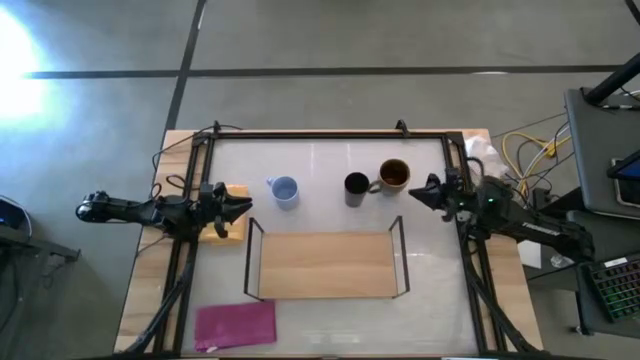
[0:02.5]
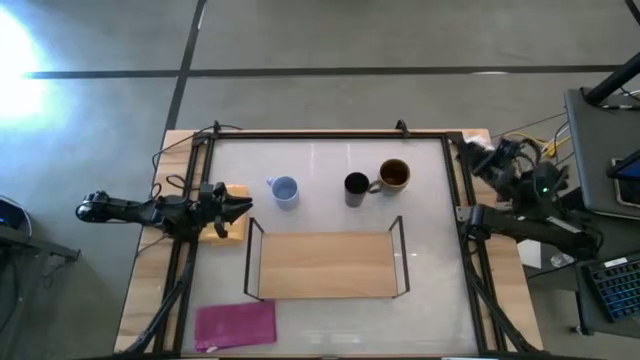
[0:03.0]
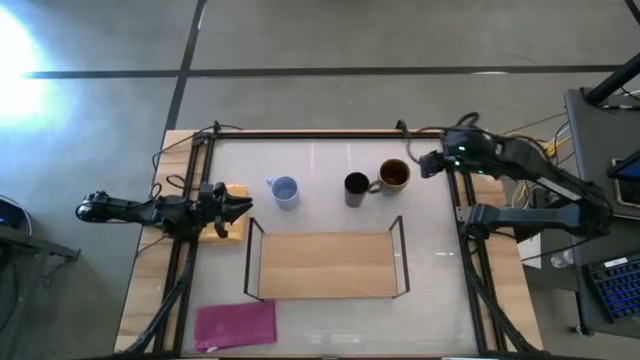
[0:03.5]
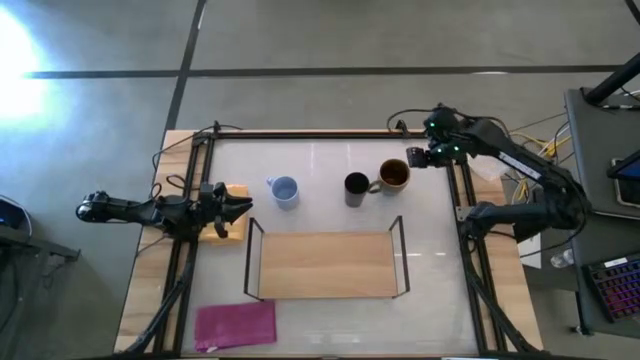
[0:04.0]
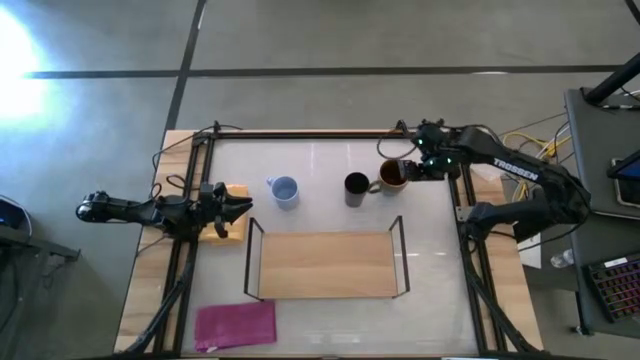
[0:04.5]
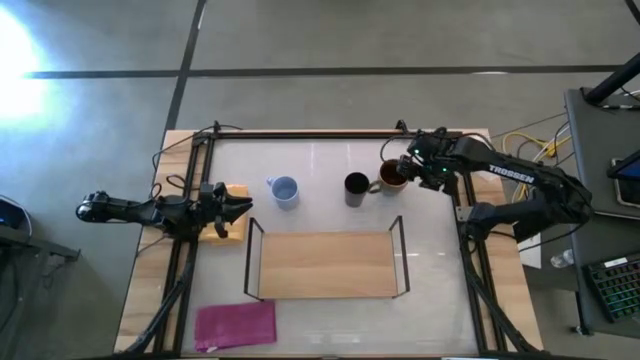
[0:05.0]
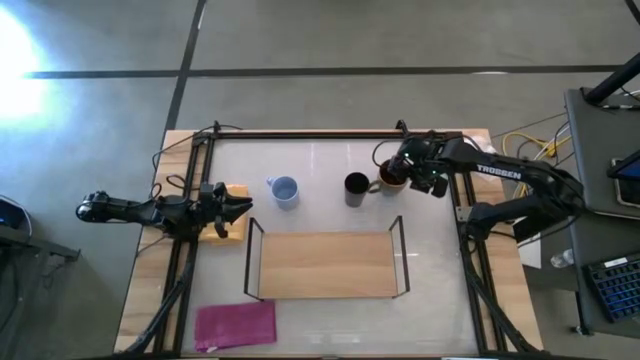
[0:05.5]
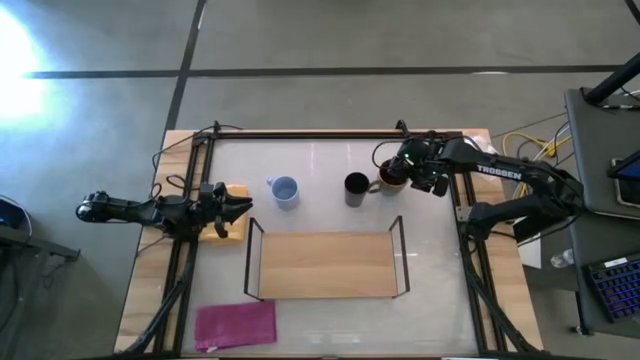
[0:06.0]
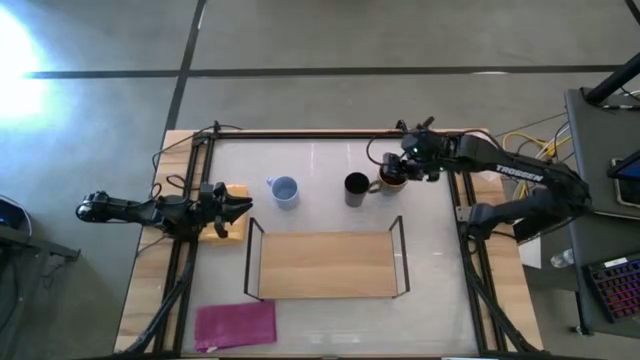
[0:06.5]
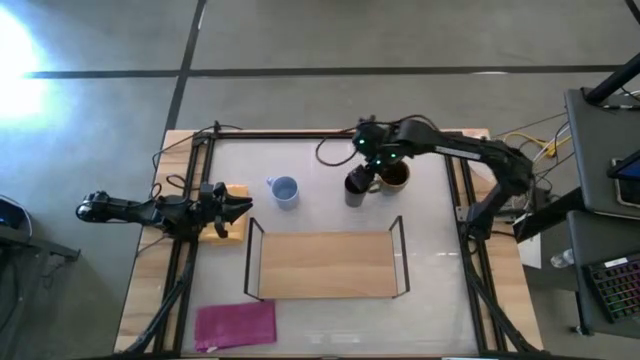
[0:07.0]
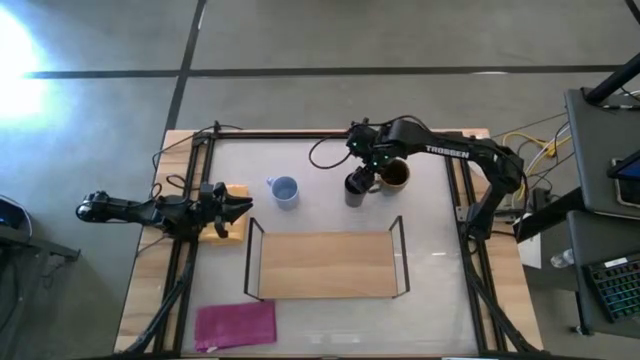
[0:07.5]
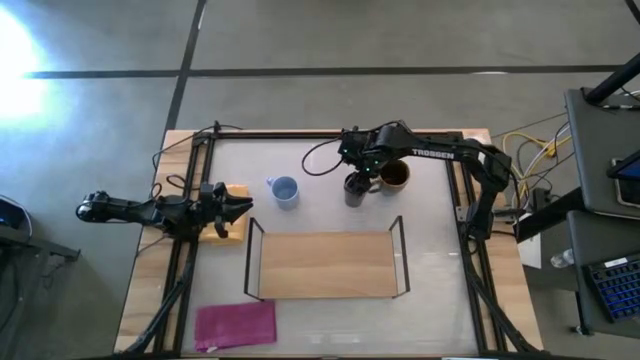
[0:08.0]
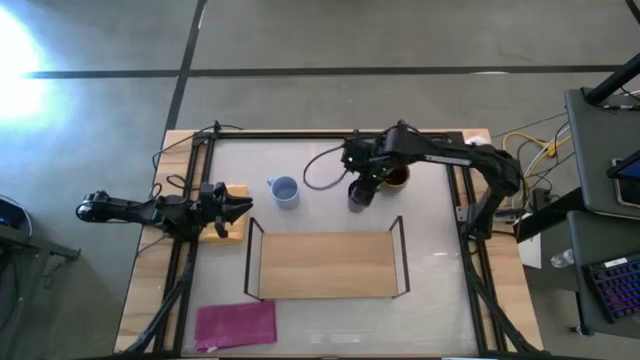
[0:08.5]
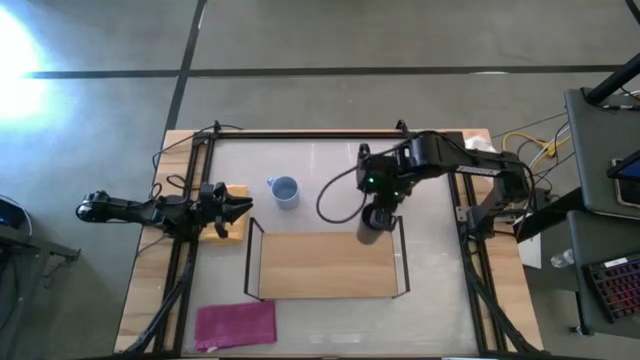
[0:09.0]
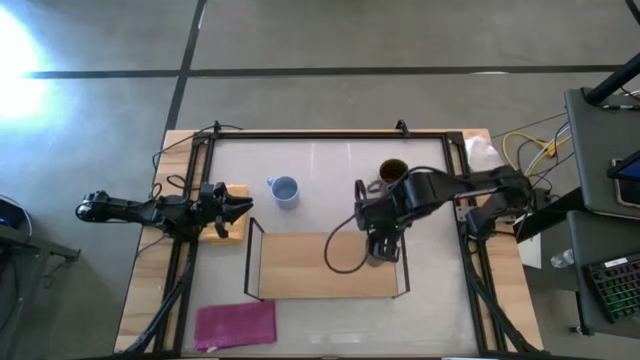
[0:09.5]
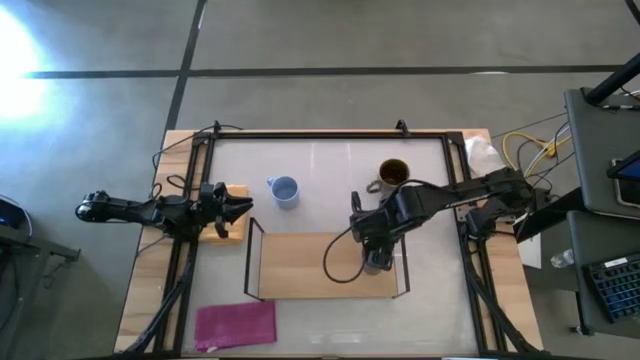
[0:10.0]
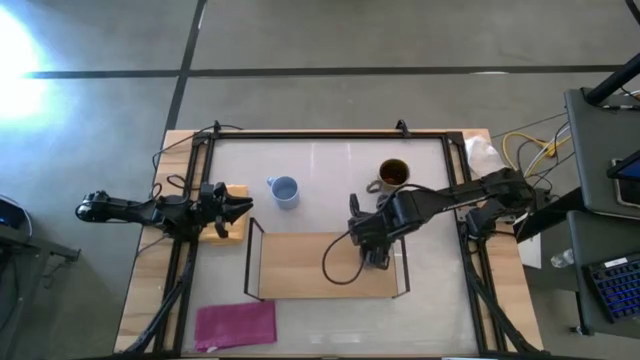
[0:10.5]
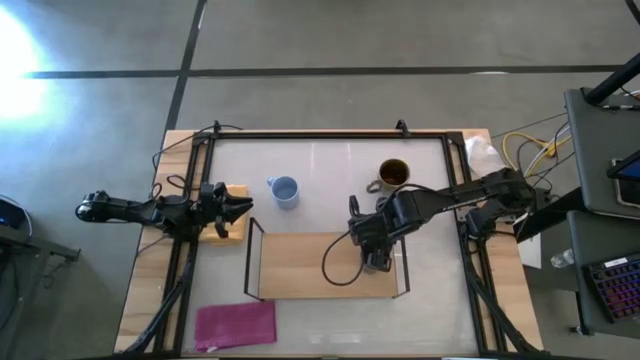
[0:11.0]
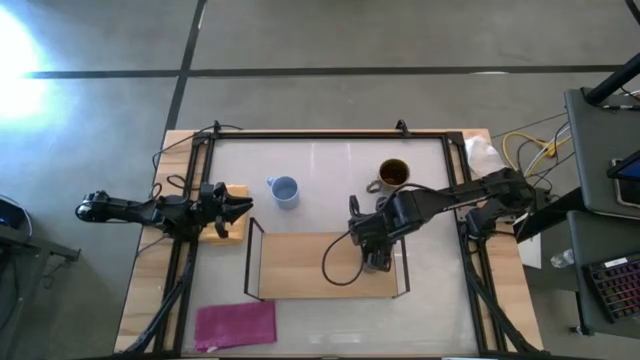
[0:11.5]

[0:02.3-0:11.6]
Task: Stack small to large cups/mugs on shelf
Put the black cup on the shelf

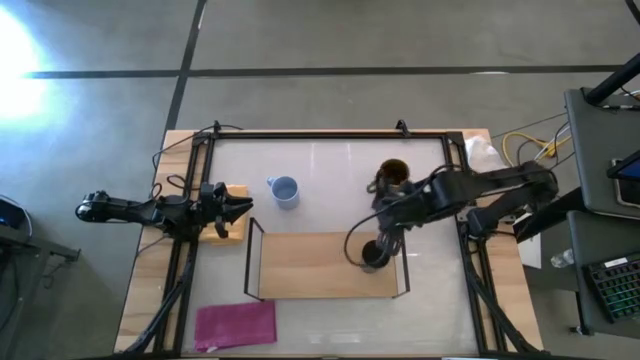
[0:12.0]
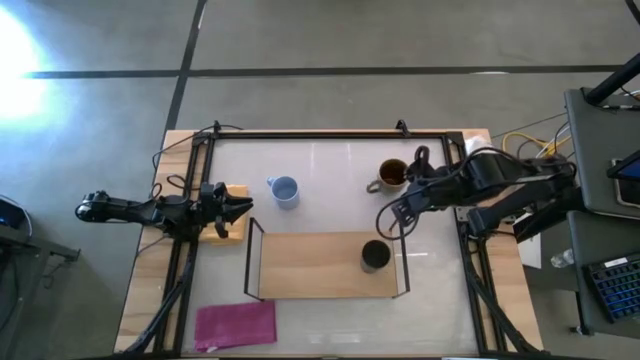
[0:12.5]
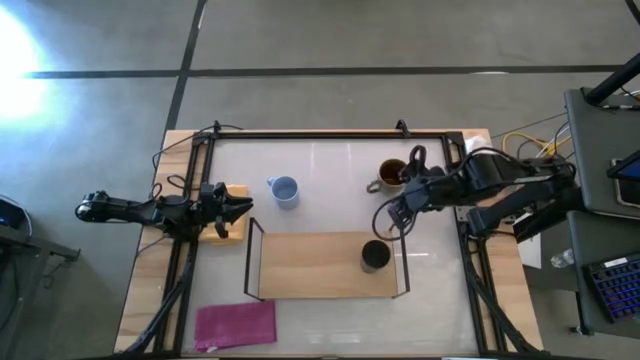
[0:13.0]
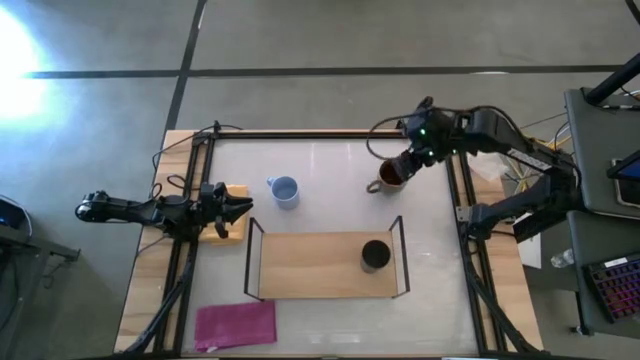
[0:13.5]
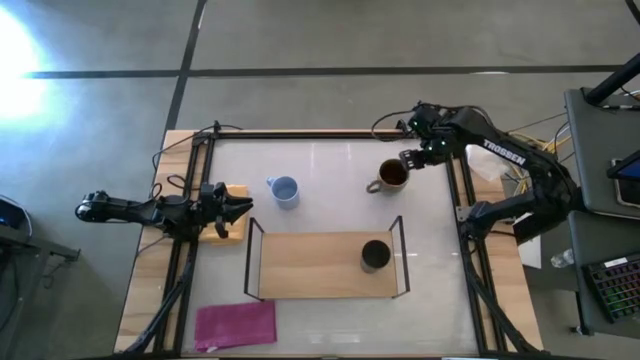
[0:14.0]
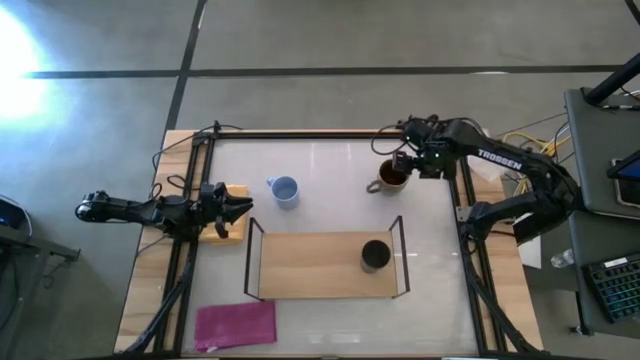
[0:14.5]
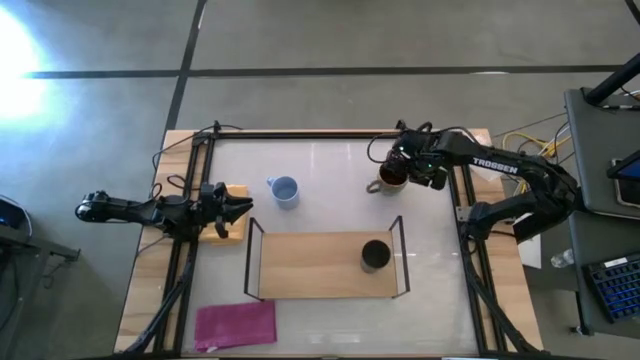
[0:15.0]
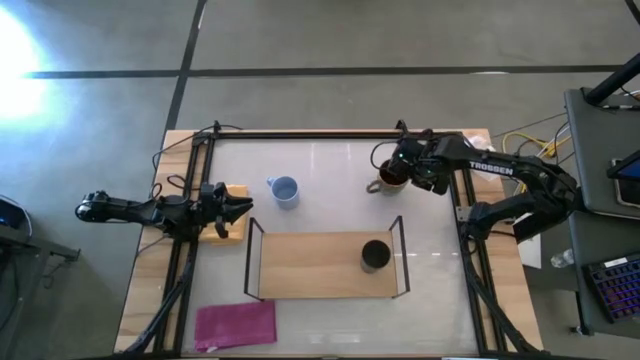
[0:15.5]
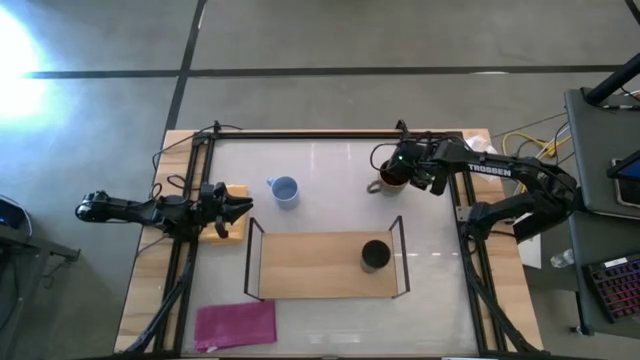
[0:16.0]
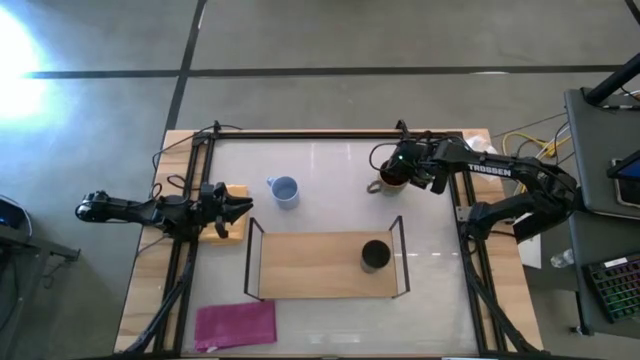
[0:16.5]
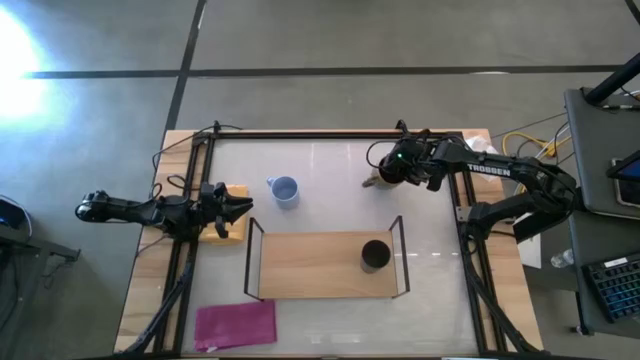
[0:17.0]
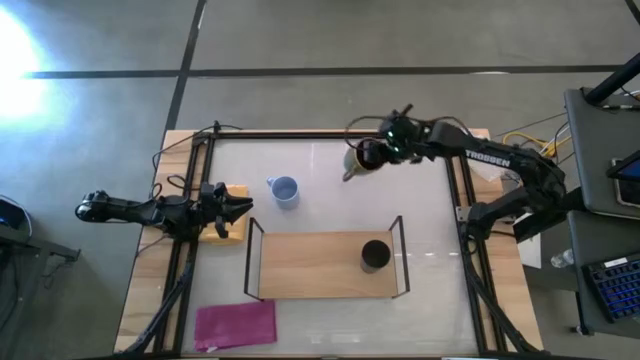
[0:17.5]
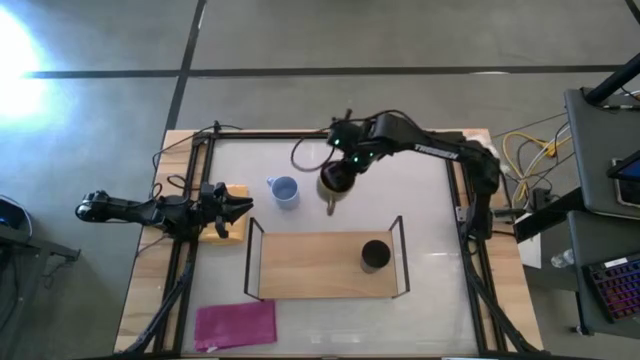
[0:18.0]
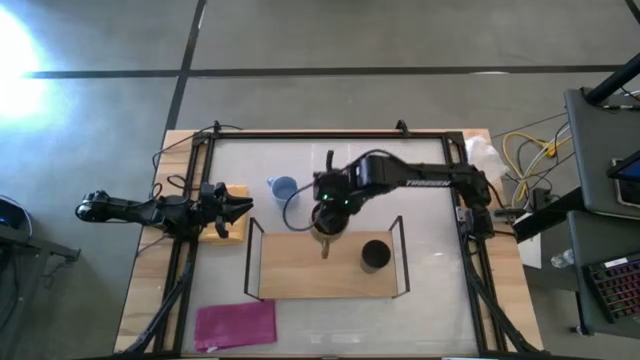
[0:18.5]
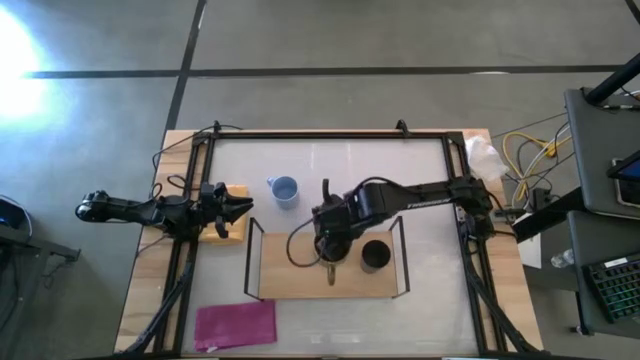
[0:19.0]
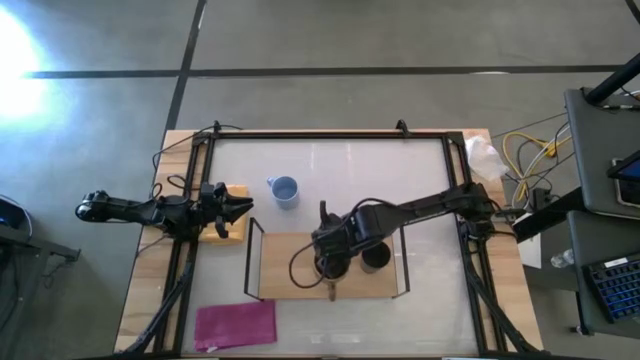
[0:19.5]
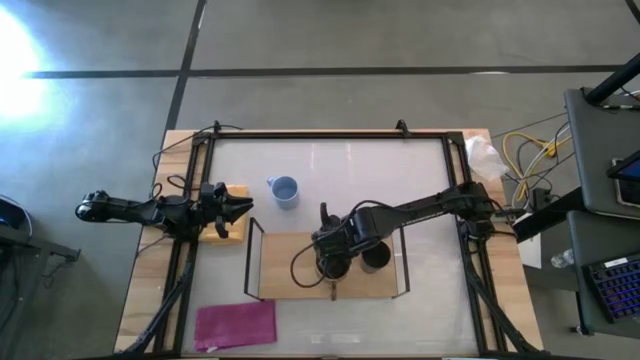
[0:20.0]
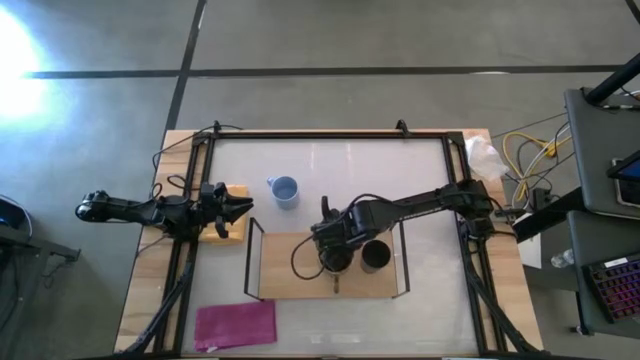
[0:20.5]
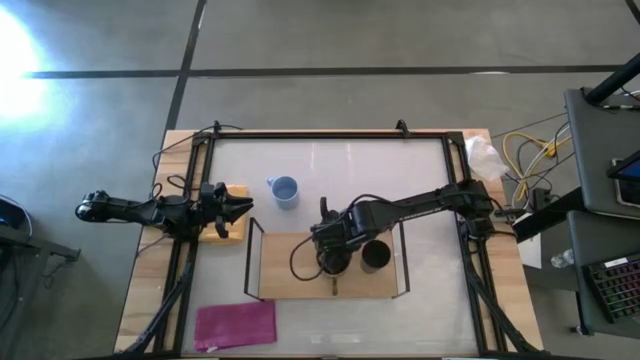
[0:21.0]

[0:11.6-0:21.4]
Put the brown mug on the shelf

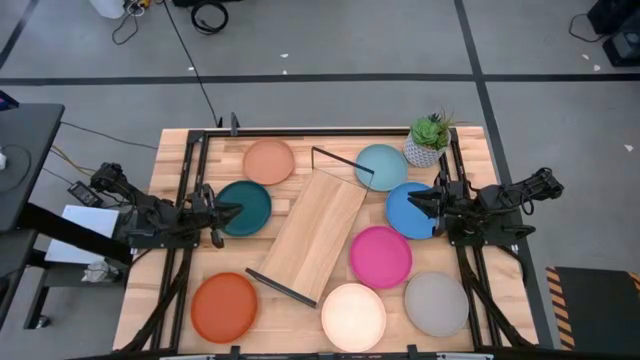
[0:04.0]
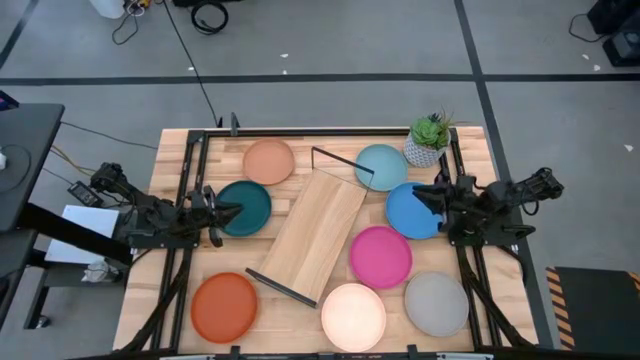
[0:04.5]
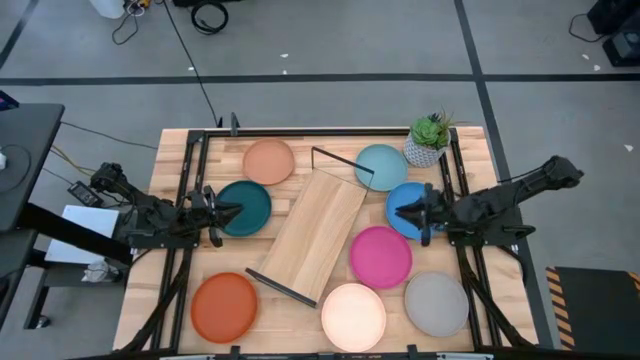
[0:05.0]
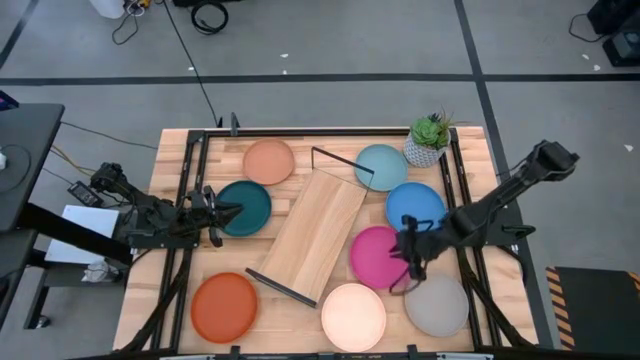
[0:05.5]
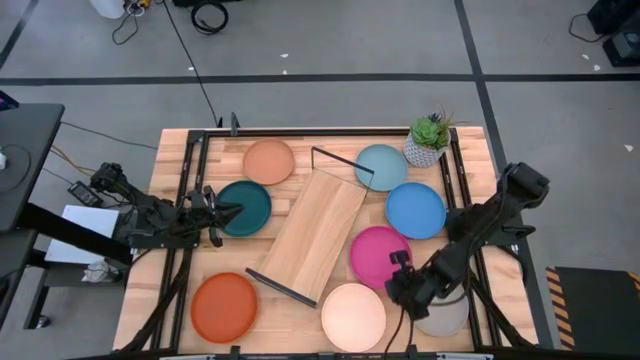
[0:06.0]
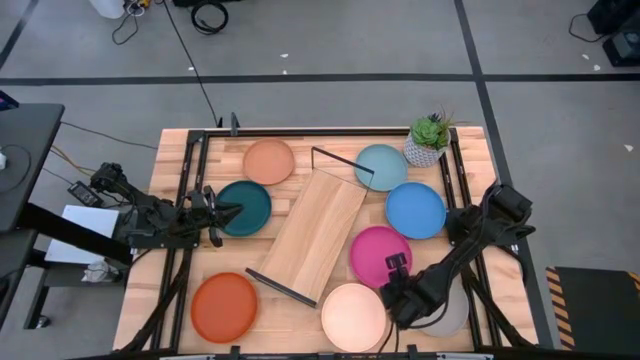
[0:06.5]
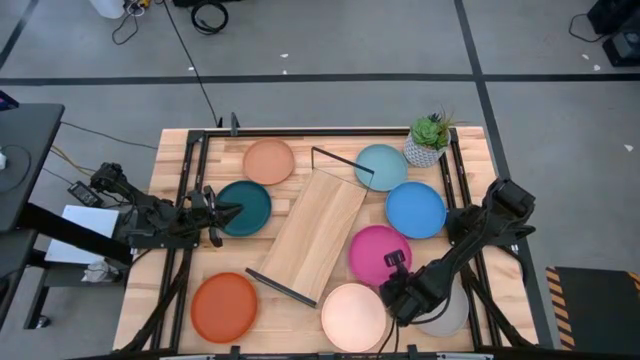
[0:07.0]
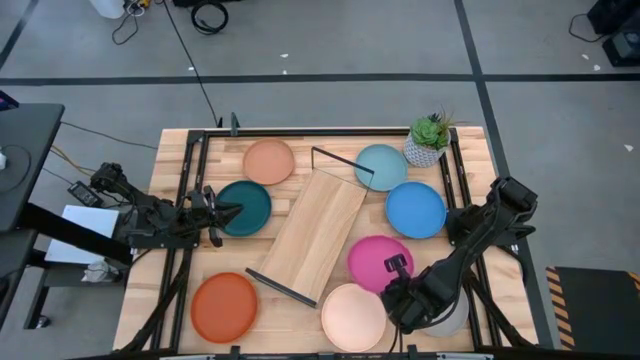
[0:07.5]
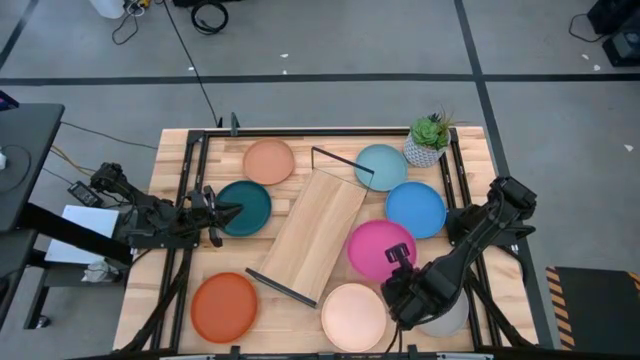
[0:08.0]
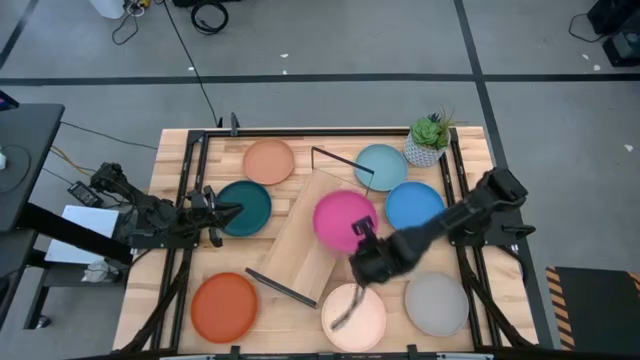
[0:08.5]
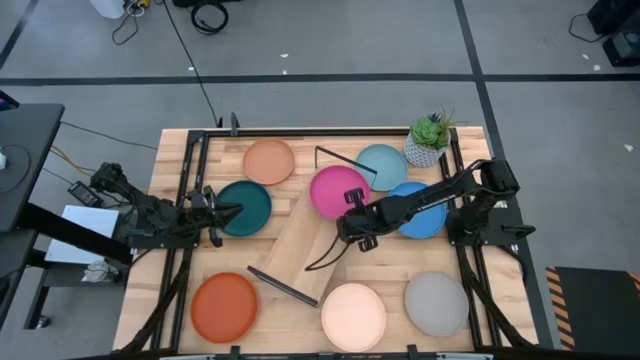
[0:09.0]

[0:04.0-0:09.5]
Task: Place and stack plates onto a shelf
Put the pink plate on the shelf
